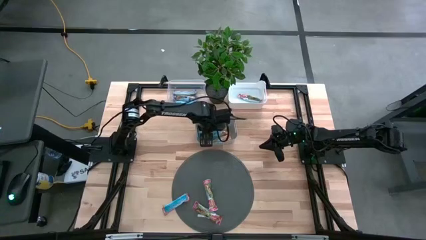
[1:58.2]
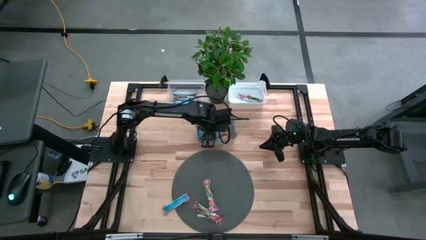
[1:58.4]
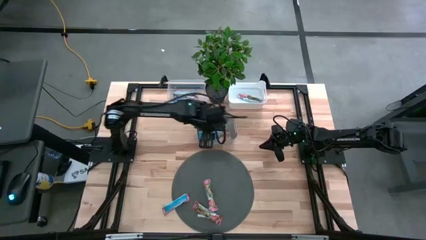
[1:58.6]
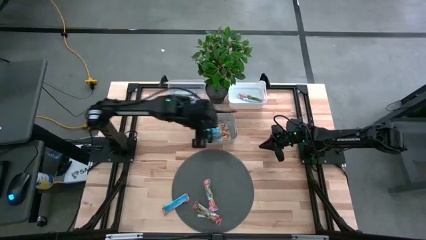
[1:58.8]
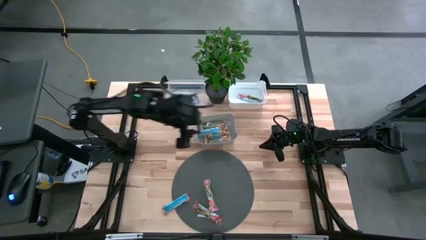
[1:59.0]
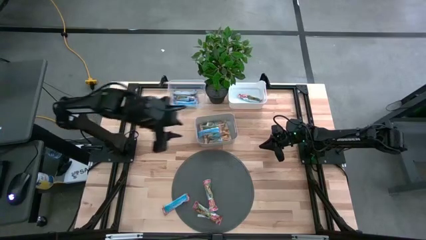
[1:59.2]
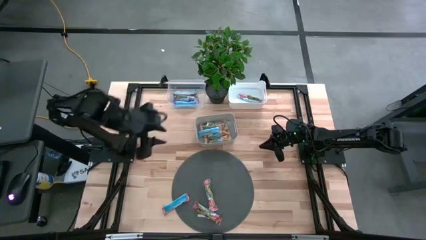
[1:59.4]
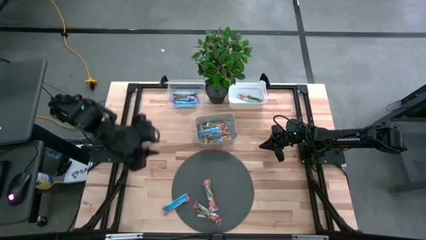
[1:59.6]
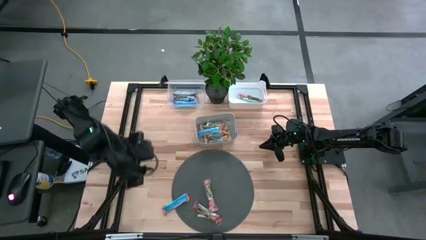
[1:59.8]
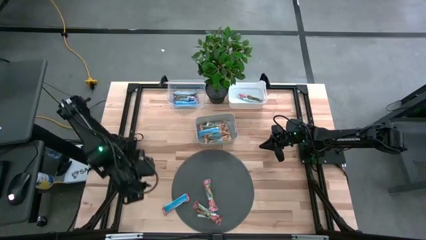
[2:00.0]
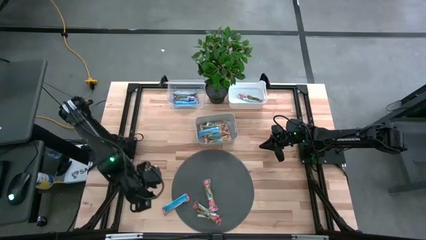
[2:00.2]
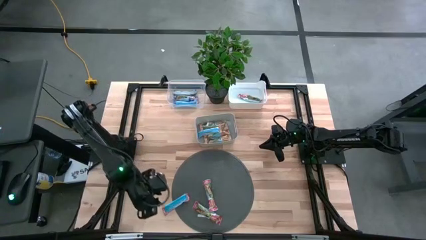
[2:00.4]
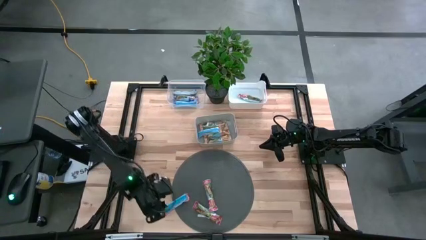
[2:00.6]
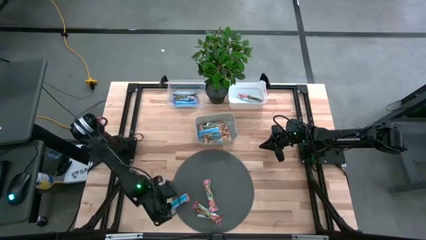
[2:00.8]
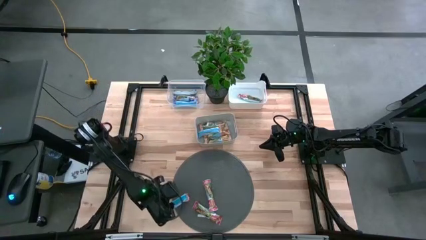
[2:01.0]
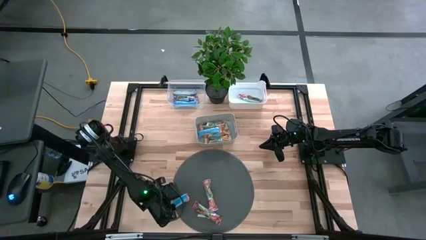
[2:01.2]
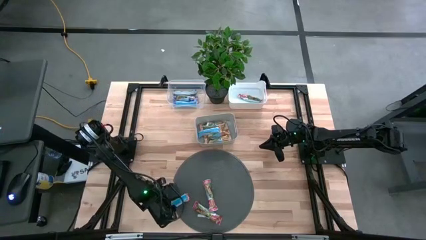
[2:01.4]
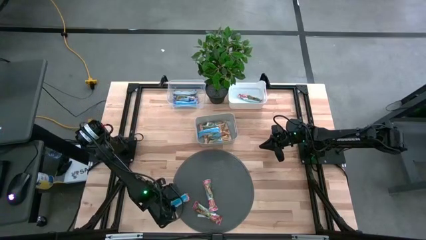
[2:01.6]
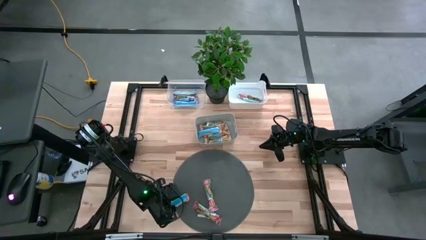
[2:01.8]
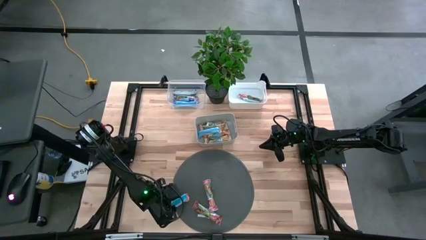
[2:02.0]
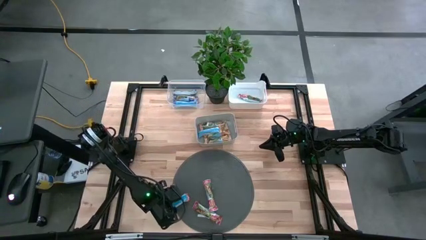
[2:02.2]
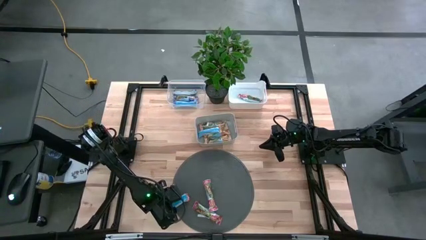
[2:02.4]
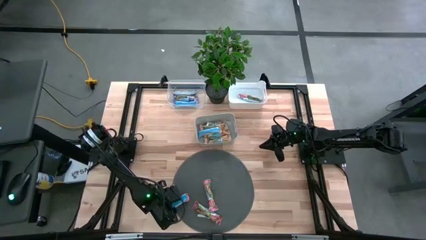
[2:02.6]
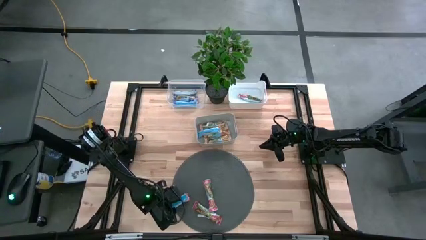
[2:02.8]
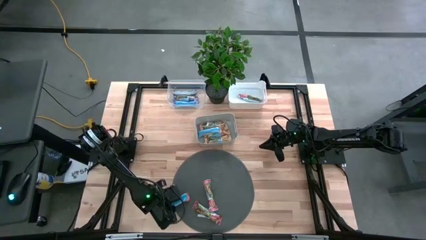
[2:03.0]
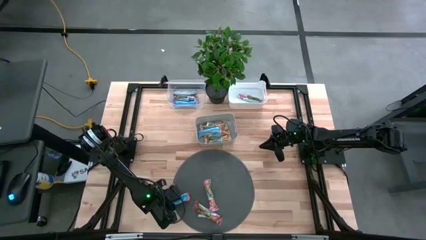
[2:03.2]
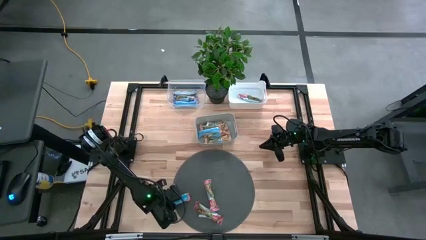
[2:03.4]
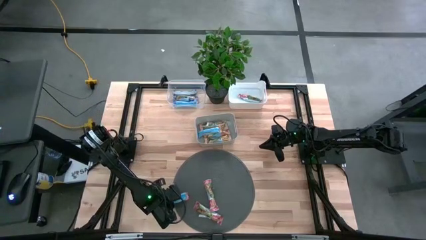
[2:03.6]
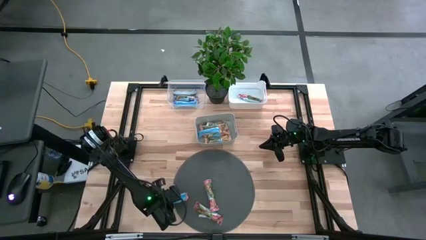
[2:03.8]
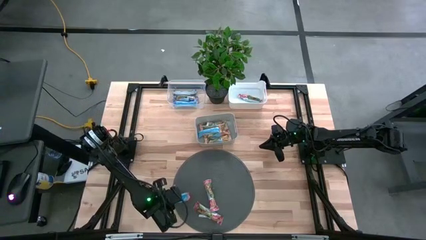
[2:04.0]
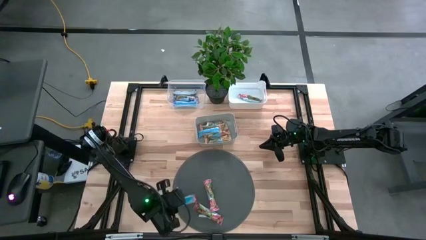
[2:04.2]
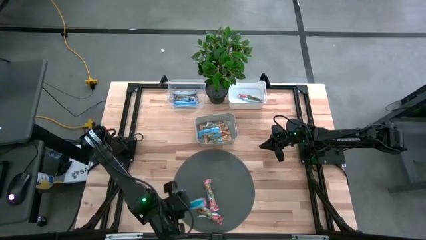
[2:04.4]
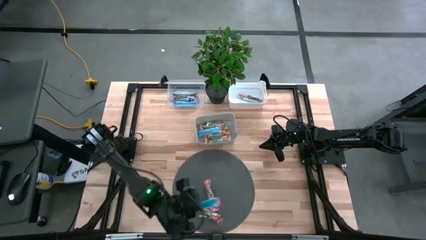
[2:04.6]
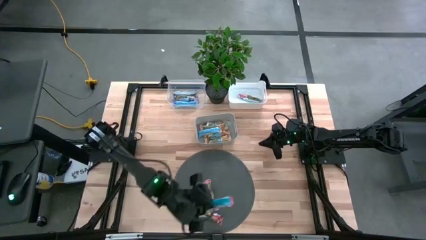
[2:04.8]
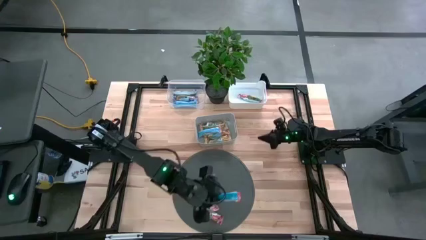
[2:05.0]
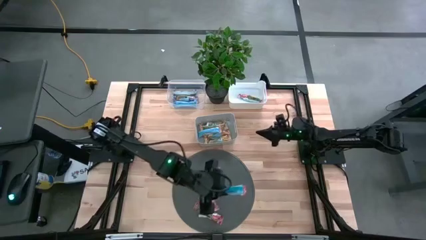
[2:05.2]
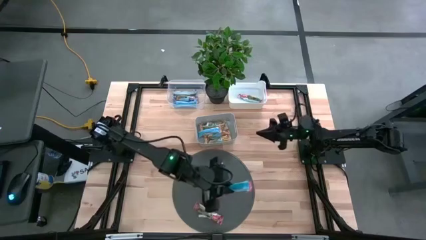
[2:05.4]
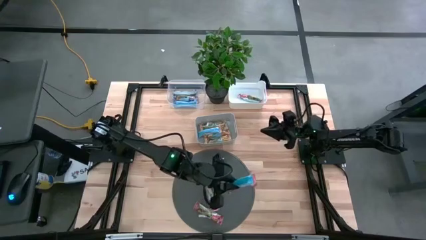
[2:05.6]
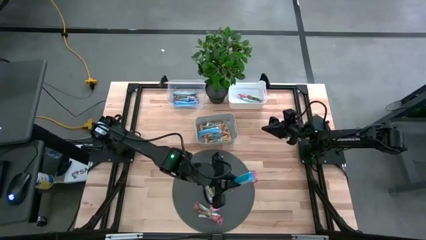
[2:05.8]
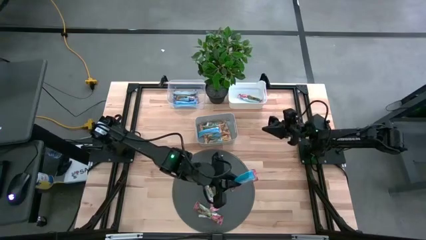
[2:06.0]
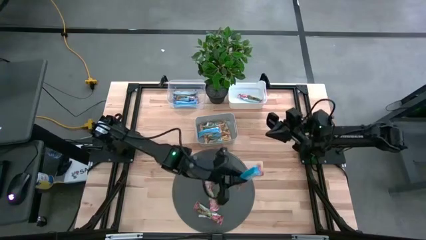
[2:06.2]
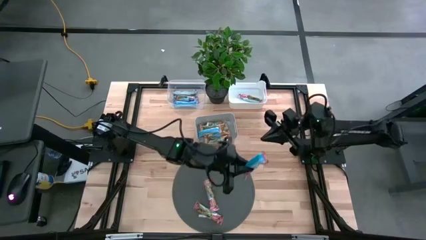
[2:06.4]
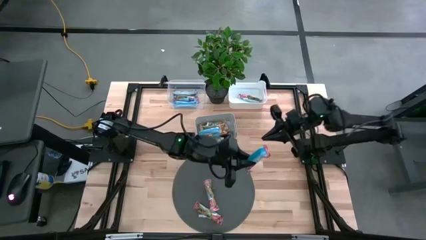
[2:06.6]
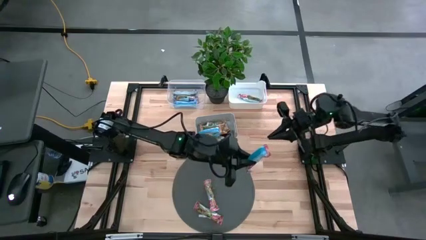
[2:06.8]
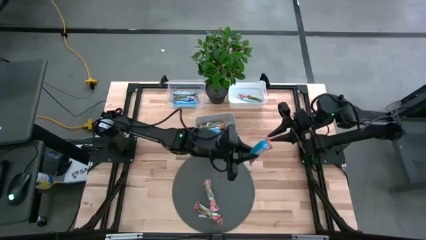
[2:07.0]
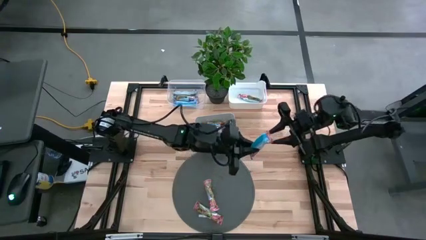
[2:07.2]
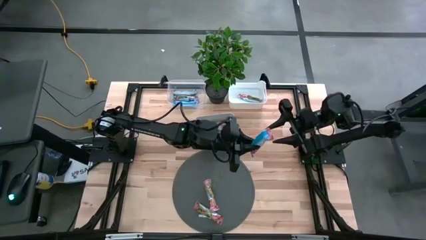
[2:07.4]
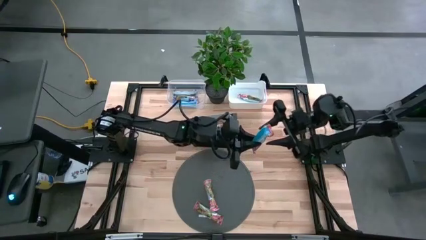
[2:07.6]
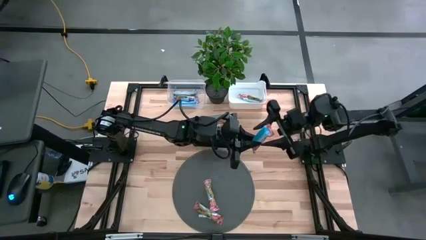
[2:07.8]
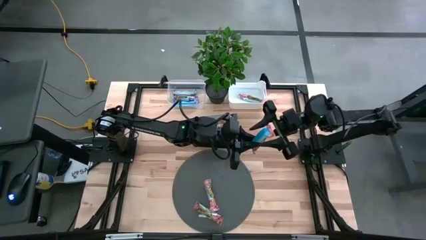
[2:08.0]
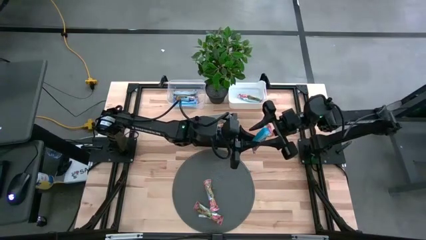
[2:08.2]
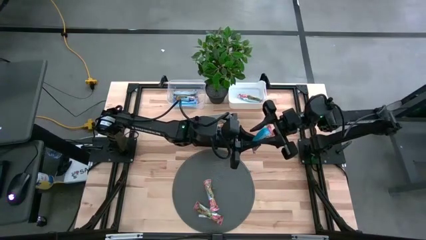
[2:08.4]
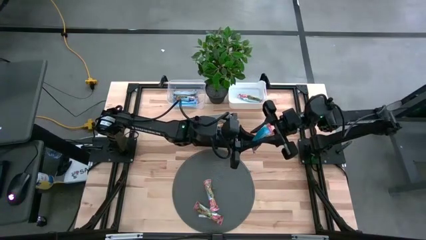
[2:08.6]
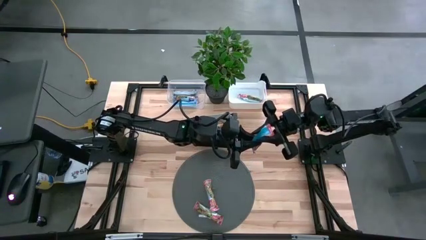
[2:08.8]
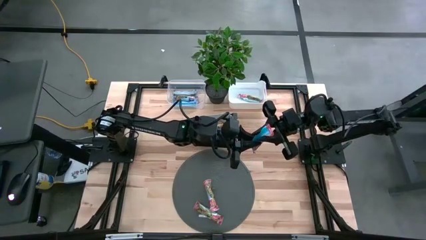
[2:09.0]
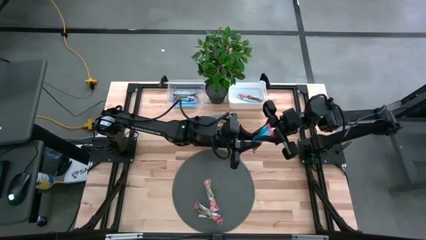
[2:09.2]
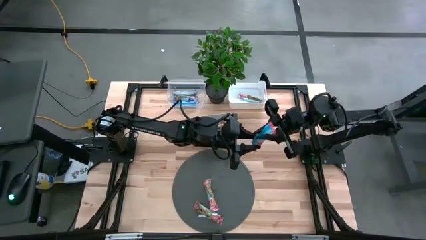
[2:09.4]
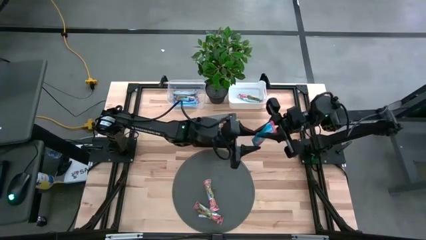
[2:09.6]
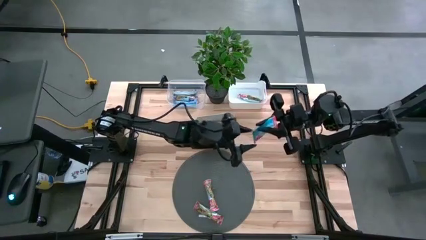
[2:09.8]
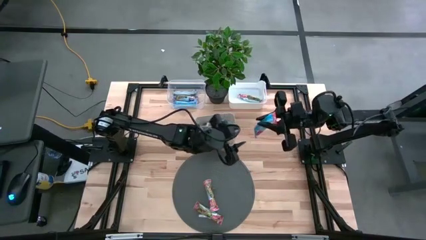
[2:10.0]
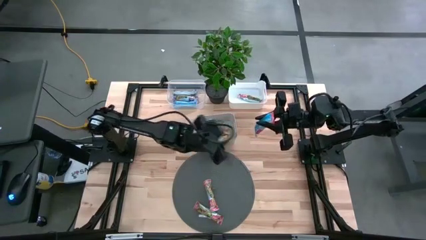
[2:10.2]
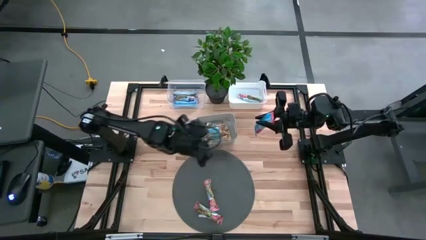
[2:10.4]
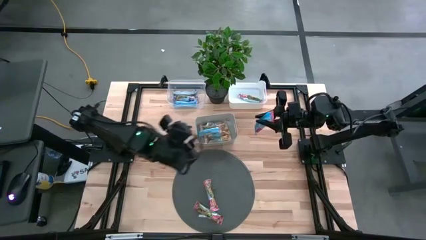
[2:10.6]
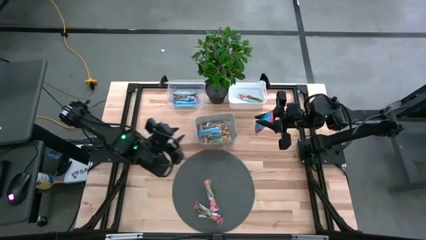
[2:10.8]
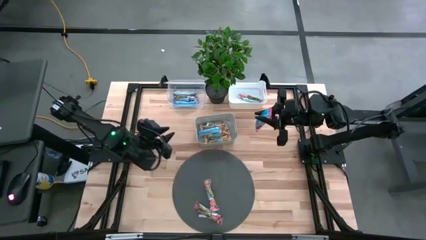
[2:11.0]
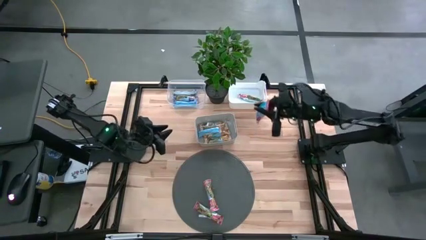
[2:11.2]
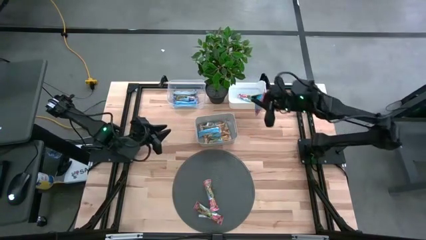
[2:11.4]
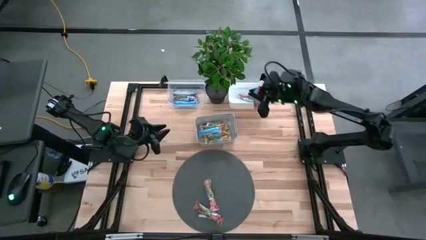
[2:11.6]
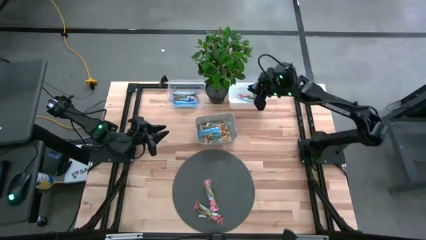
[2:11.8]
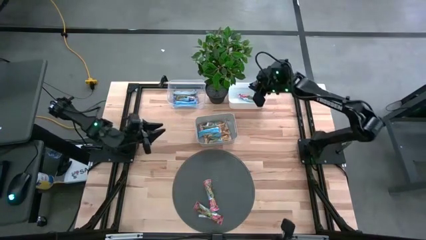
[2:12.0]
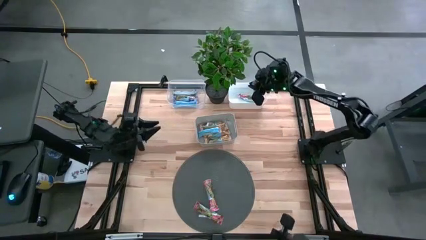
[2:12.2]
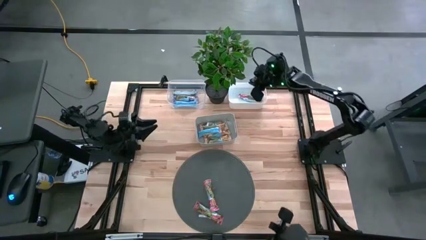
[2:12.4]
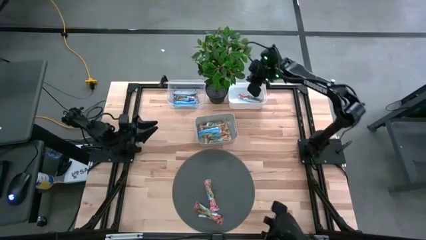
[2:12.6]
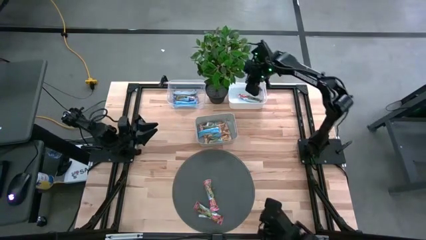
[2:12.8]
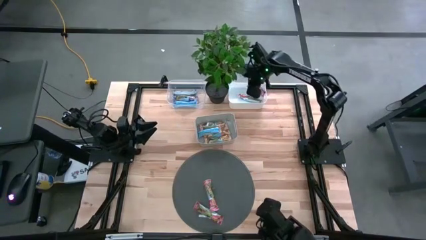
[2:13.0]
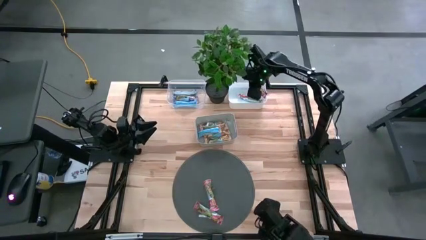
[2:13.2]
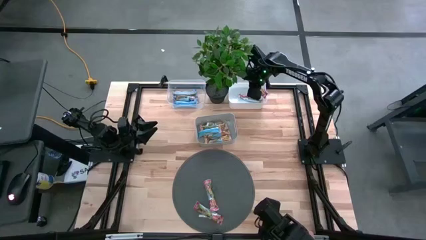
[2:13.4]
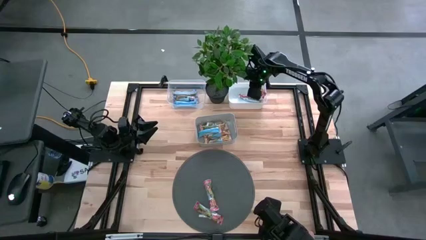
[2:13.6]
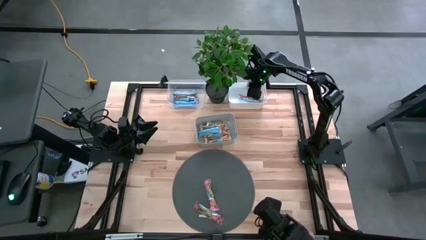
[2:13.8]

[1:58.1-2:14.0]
Task: Pick and place Granola Bars by type
Put the red granola bar into the white bin
